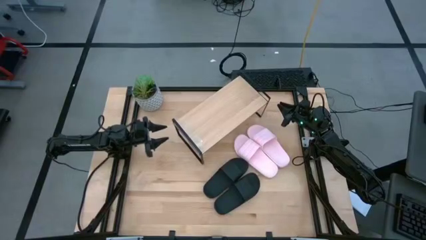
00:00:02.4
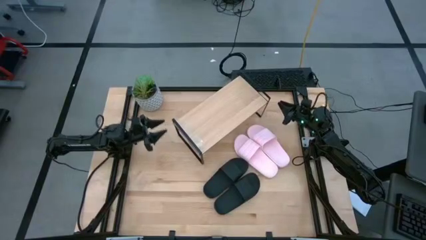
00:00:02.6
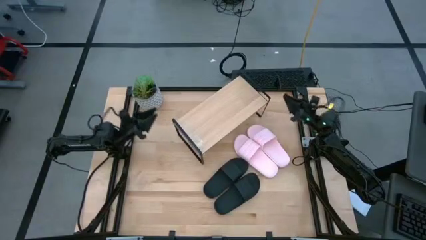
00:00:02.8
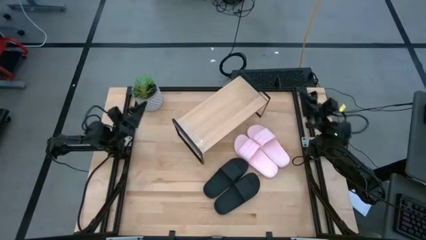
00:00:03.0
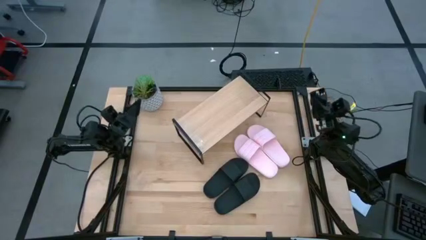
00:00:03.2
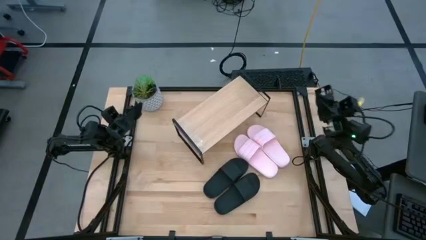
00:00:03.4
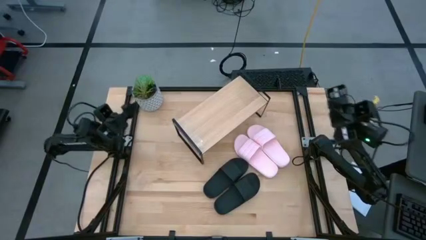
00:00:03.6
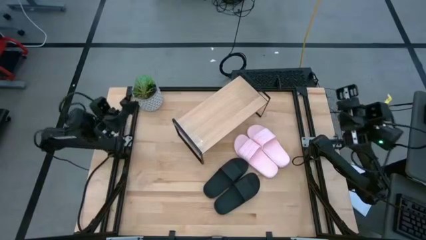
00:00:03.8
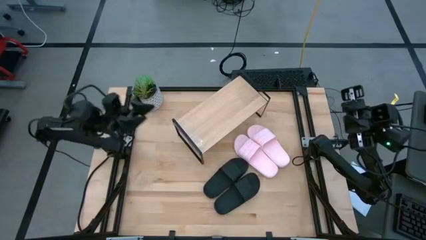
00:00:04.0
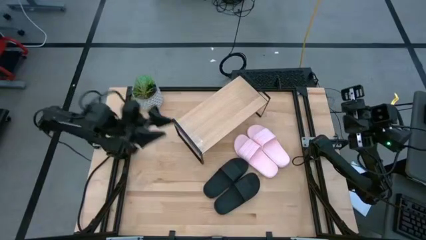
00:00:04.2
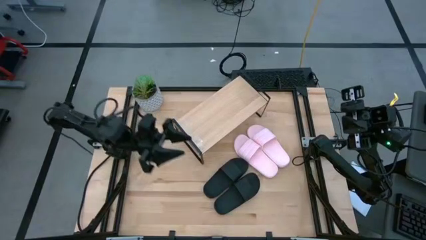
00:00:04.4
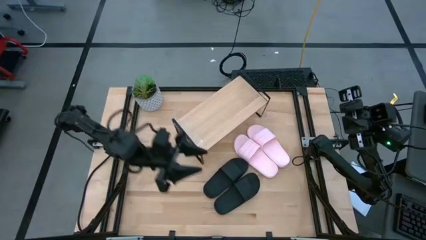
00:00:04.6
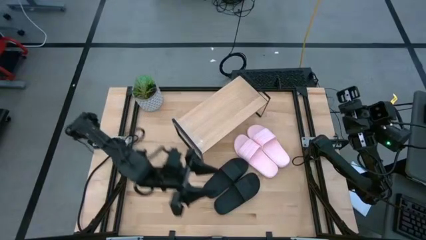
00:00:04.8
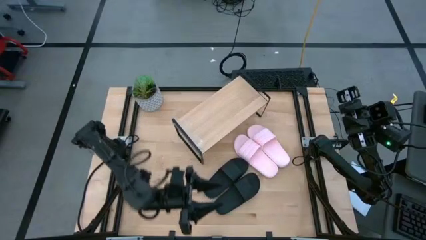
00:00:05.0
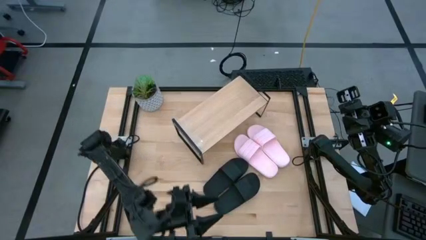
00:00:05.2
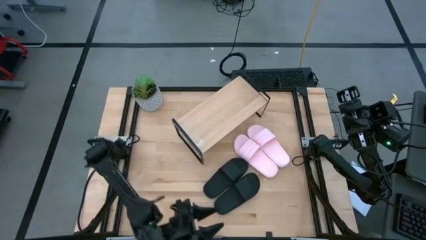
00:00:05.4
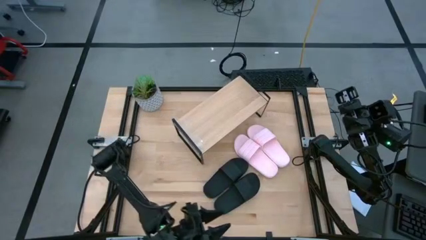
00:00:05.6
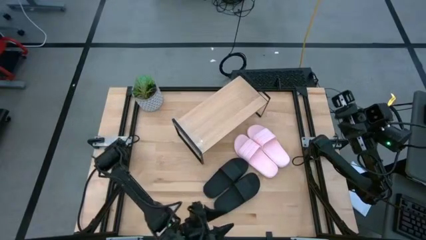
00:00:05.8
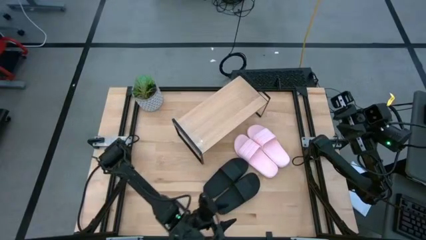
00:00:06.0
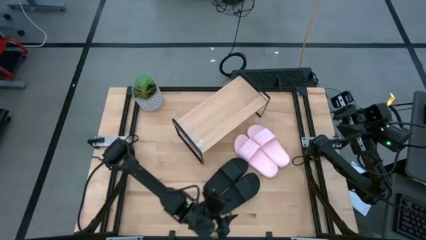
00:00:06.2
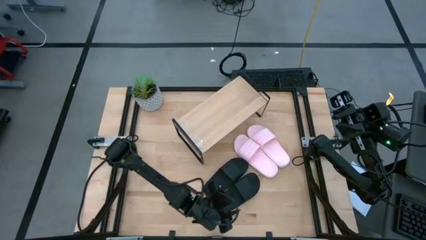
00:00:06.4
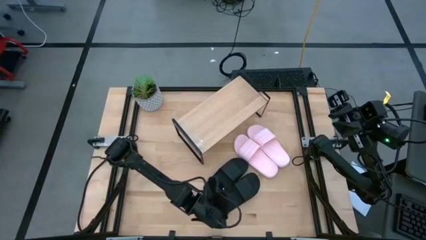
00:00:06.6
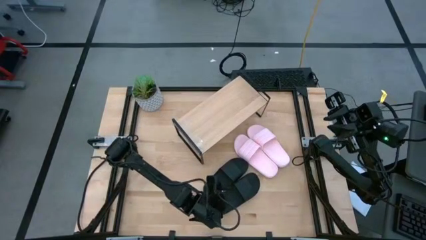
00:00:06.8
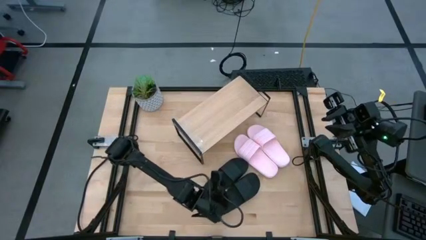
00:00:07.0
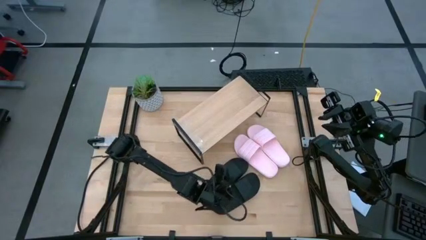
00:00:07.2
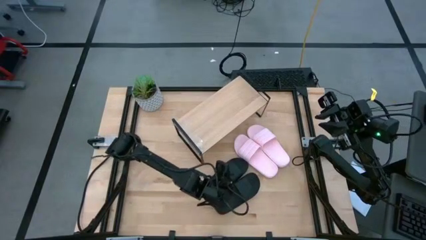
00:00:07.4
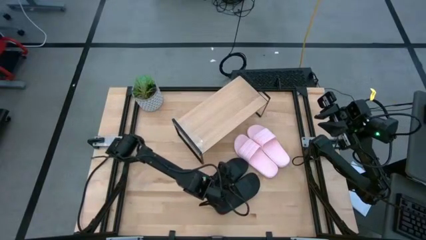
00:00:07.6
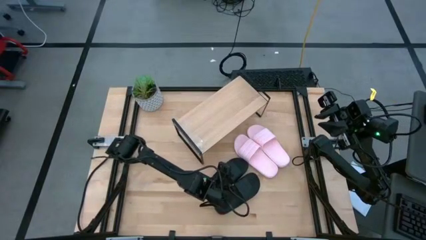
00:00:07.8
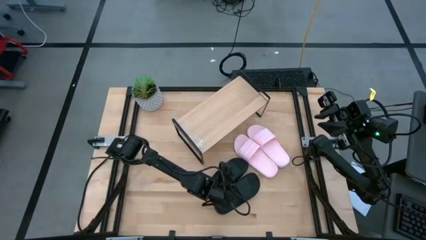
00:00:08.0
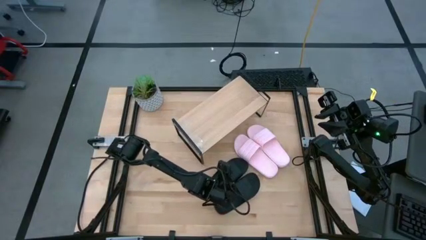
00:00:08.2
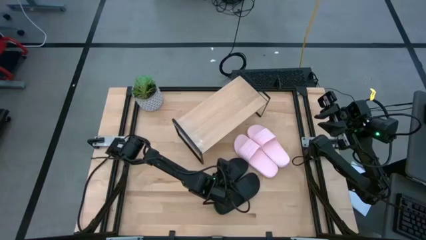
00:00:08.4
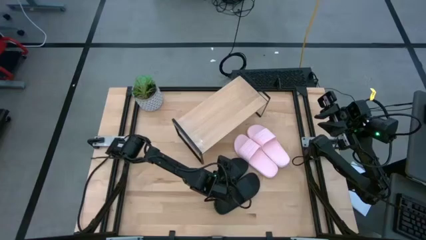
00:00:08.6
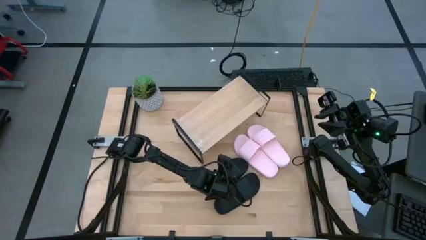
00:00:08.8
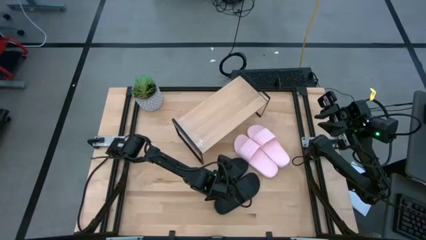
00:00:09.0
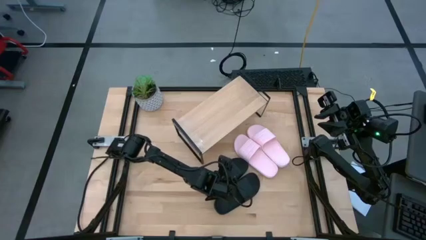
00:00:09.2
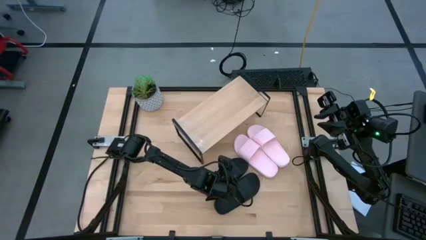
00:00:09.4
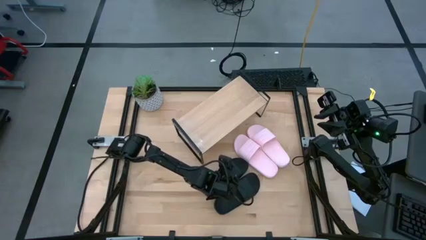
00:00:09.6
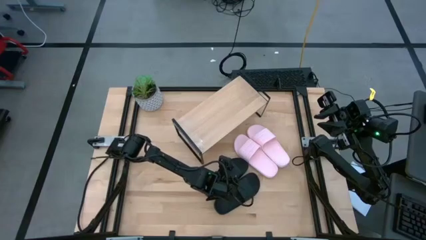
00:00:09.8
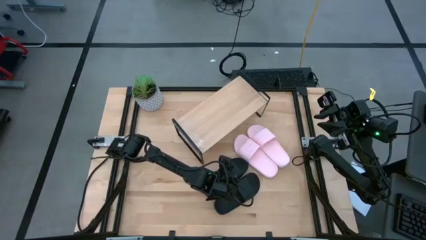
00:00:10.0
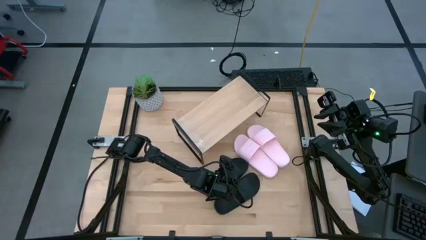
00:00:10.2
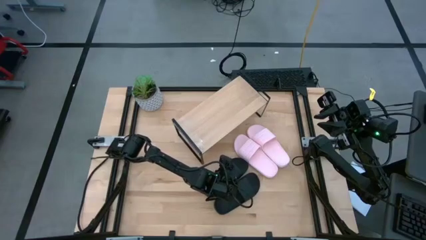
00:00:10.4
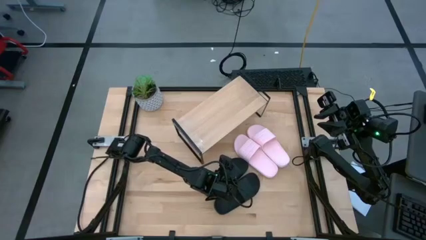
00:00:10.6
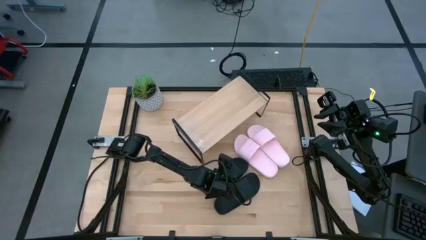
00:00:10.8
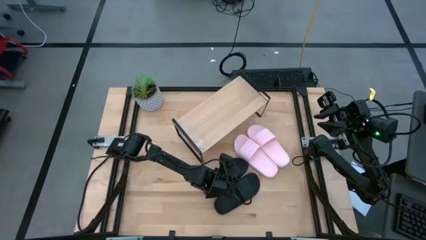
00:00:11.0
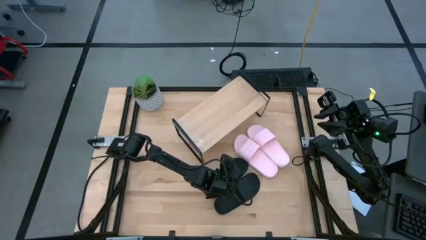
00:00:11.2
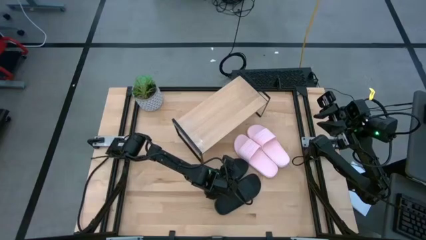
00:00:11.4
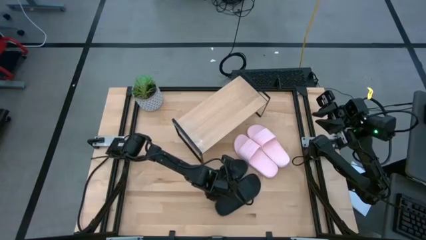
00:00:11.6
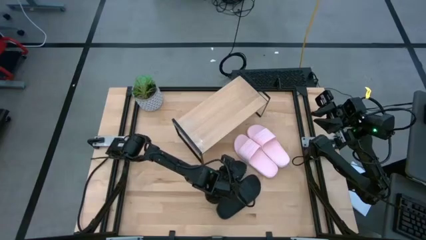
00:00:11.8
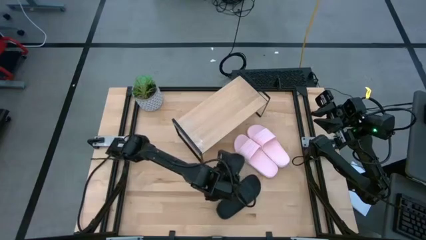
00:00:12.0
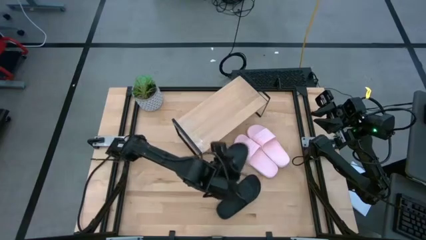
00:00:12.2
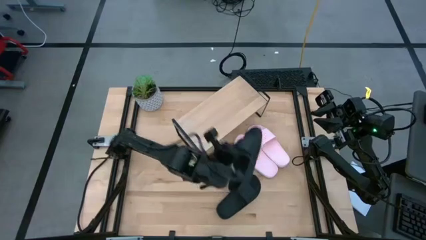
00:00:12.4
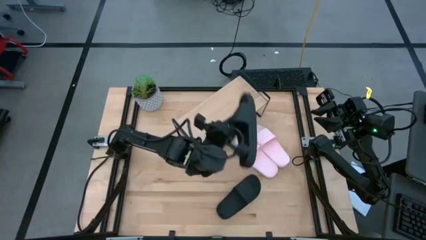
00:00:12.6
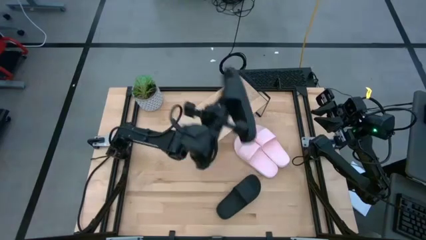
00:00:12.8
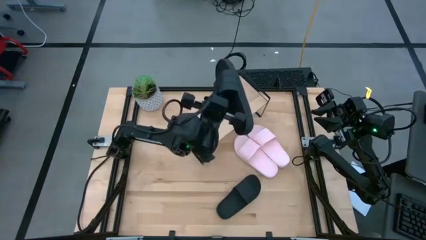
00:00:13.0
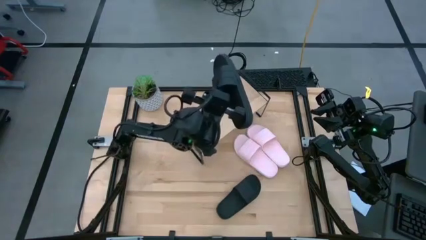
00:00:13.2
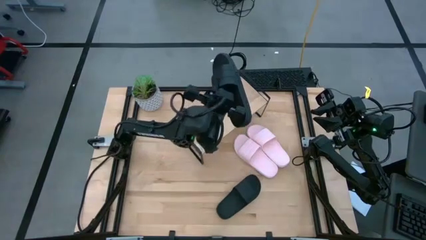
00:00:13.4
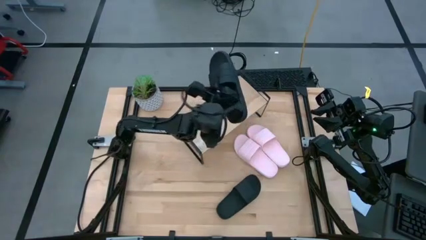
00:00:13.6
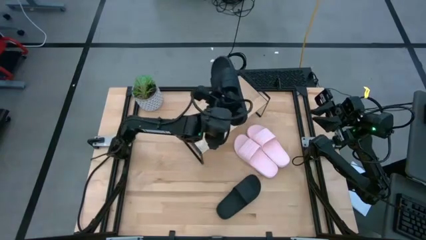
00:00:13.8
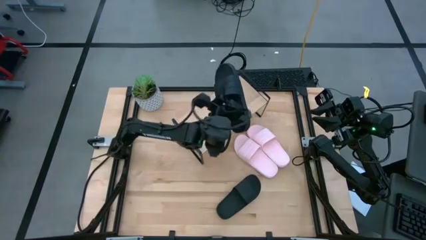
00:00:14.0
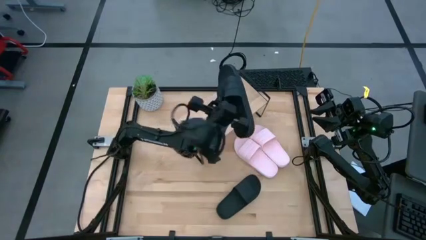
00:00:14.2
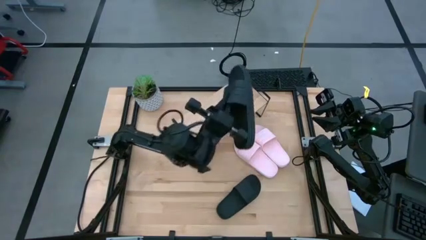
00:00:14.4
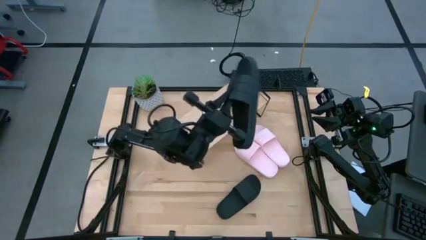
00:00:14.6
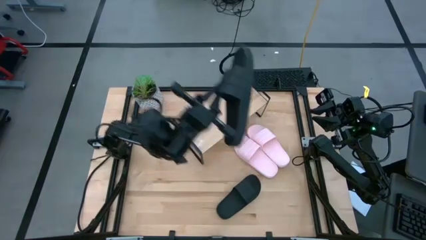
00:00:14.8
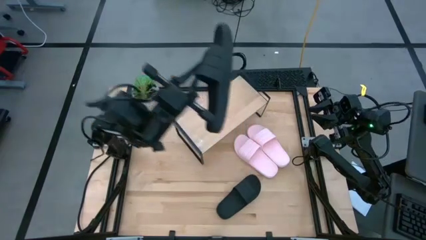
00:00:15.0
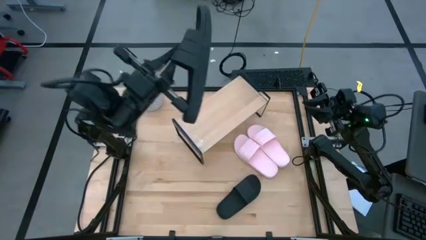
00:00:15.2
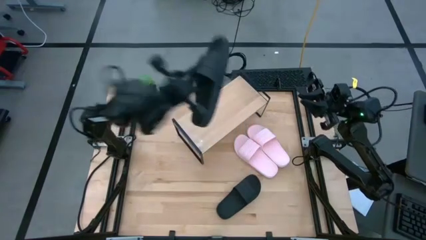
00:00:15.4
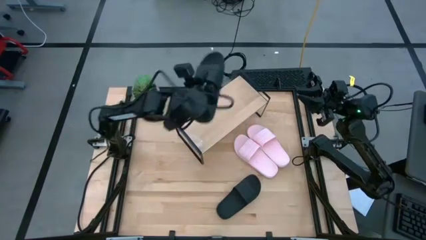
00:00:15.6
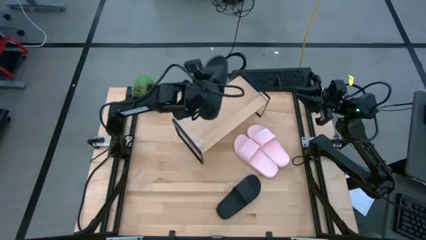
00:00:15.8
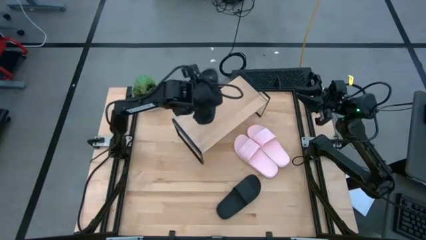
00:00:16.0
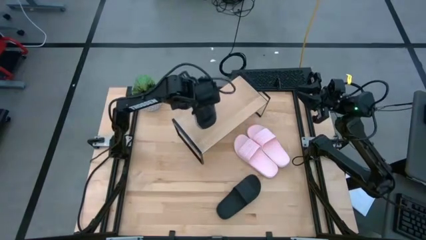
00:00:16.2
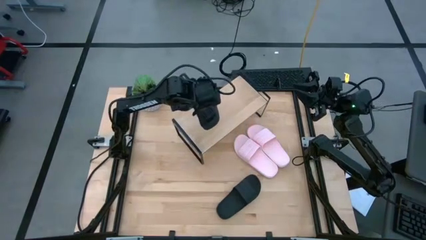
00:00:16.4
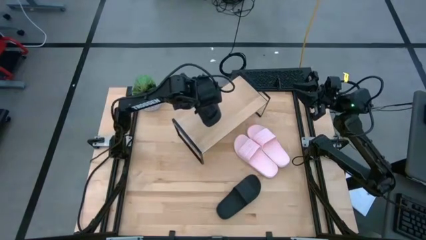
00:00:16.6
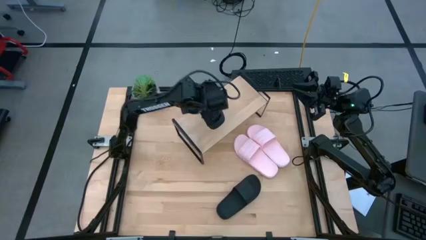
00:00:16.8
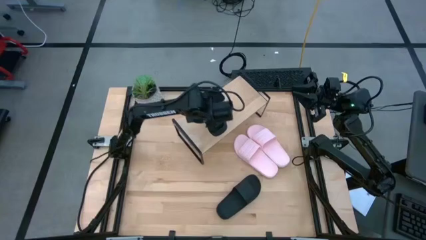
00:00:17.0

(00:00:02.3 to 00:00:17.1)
Task: Pick and place slides into the shelf
Put the left black slide on the shelf
